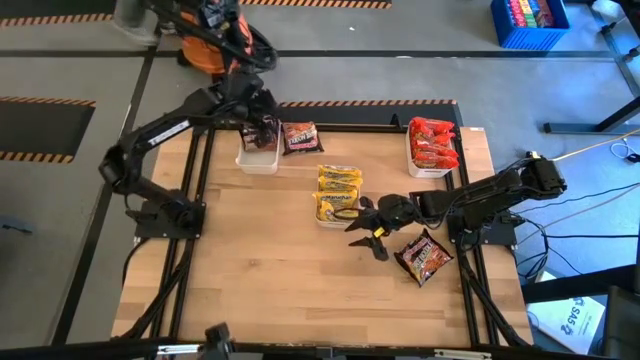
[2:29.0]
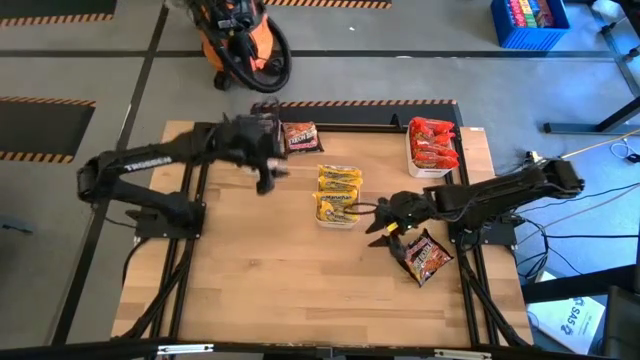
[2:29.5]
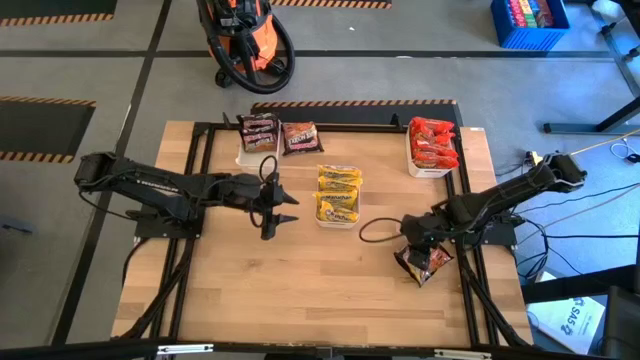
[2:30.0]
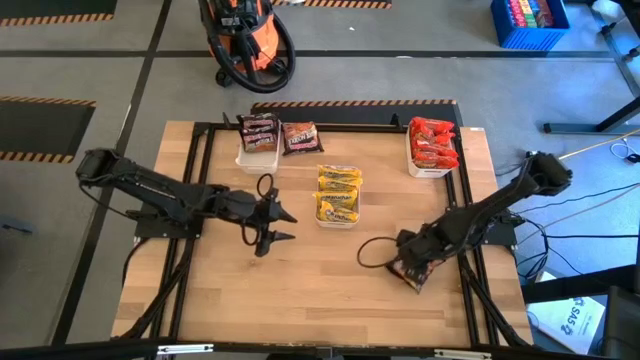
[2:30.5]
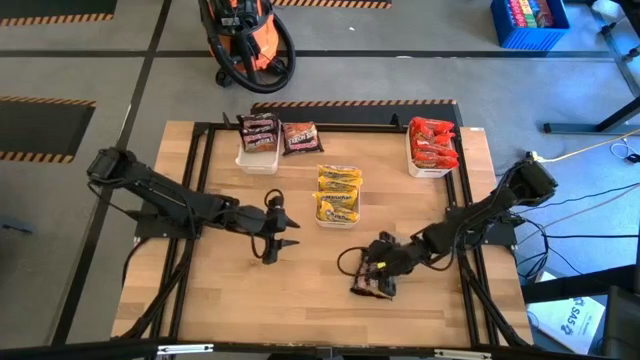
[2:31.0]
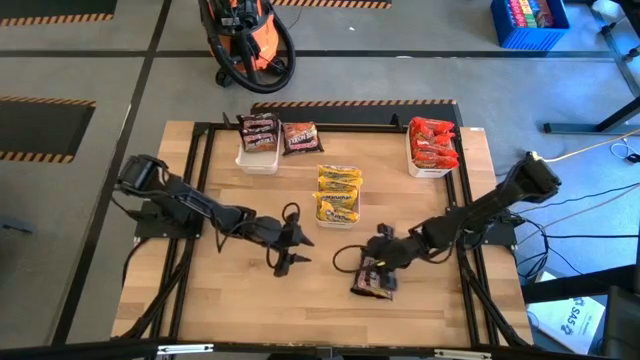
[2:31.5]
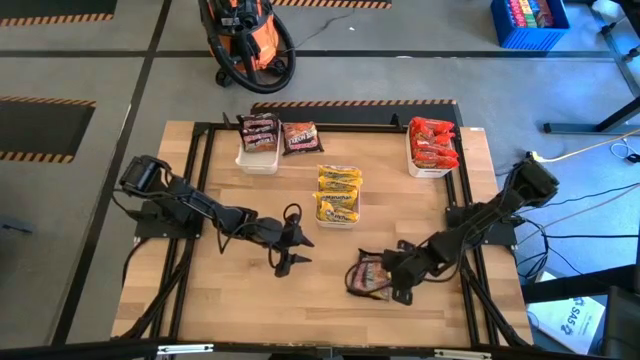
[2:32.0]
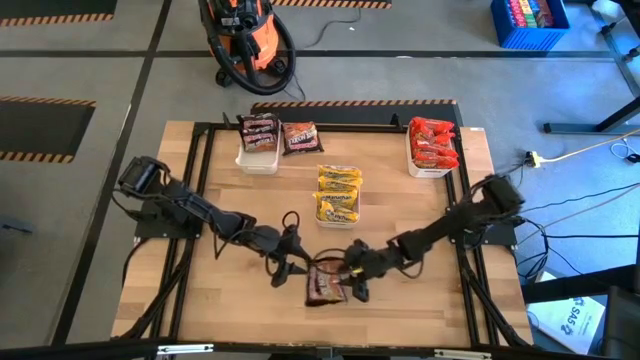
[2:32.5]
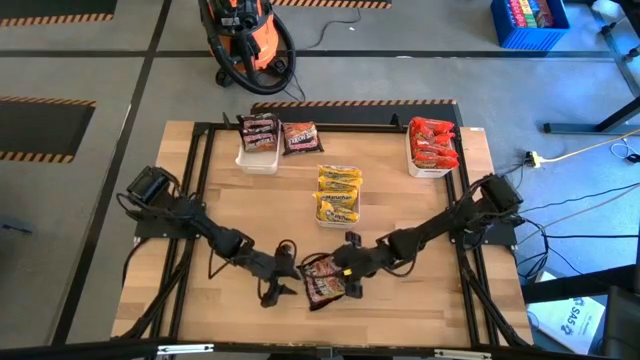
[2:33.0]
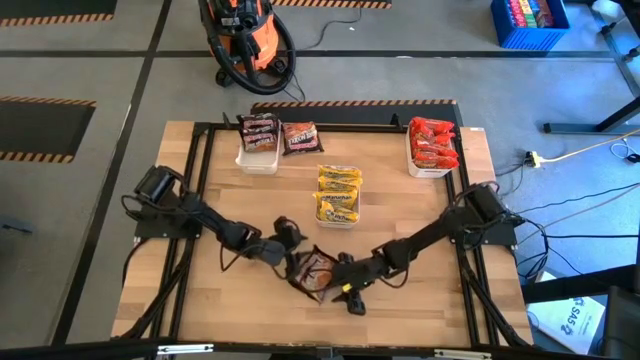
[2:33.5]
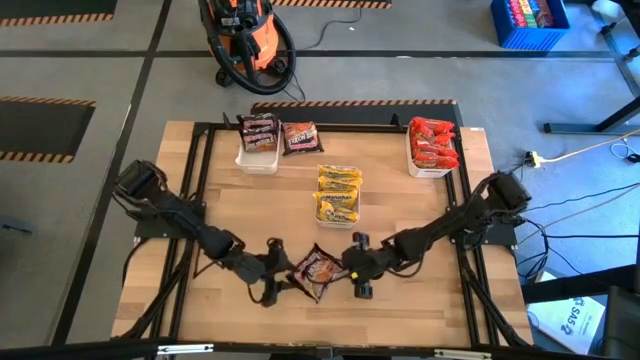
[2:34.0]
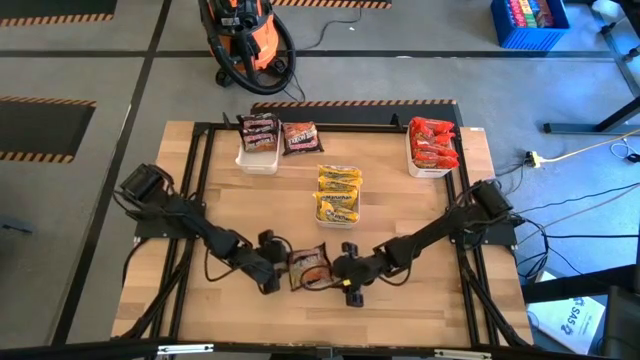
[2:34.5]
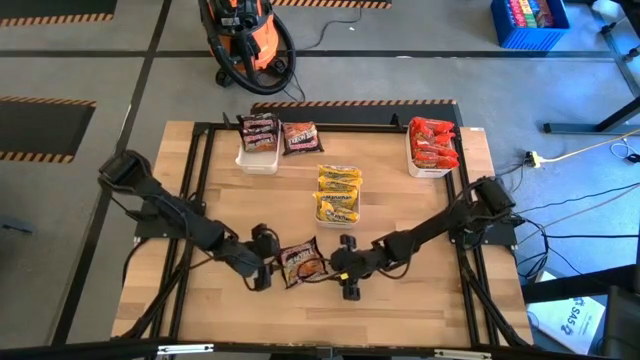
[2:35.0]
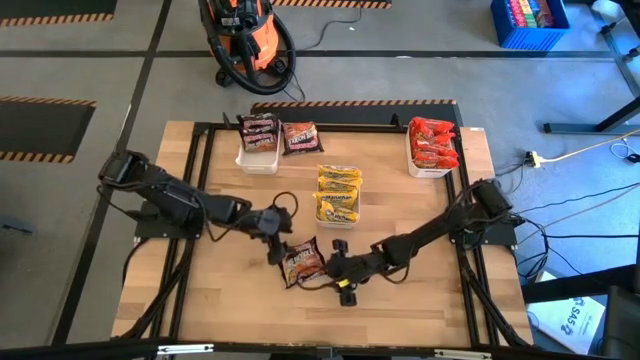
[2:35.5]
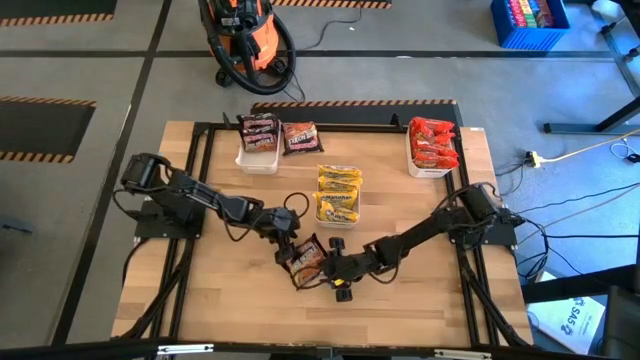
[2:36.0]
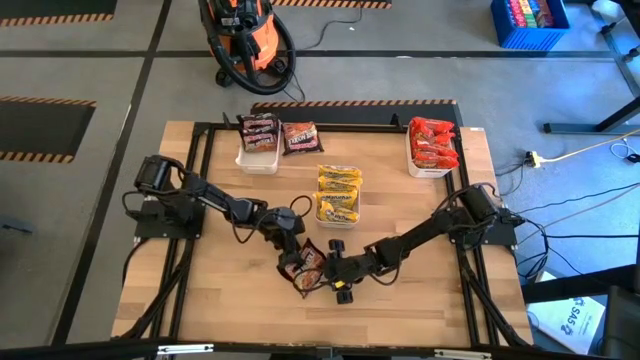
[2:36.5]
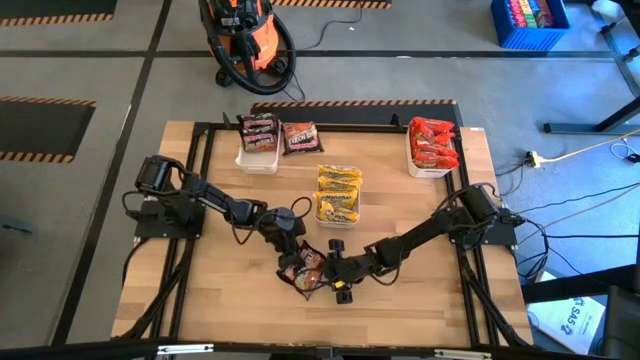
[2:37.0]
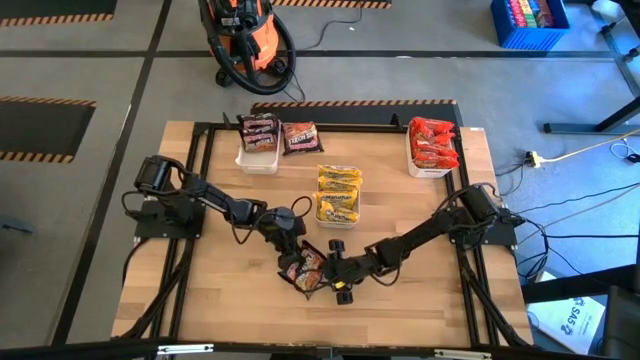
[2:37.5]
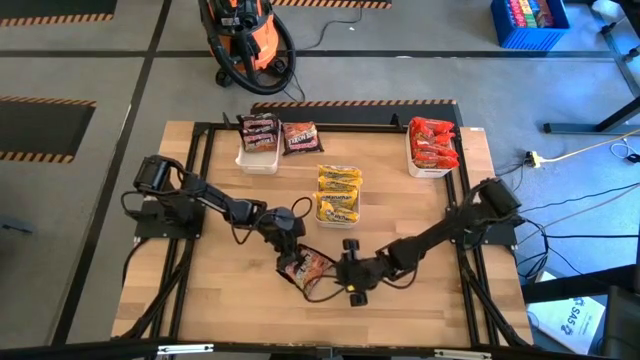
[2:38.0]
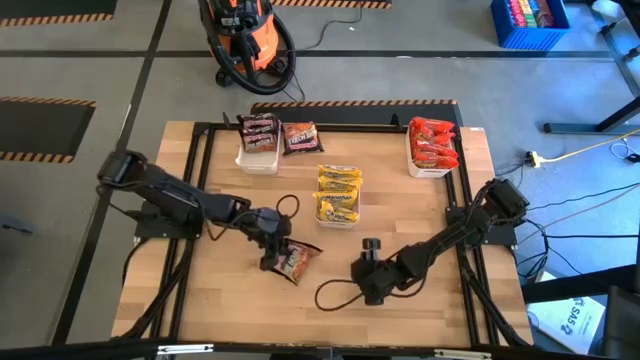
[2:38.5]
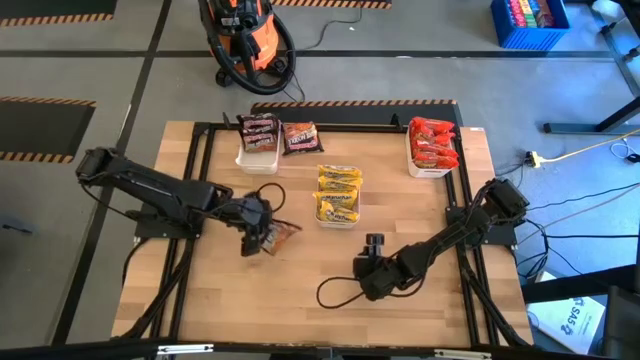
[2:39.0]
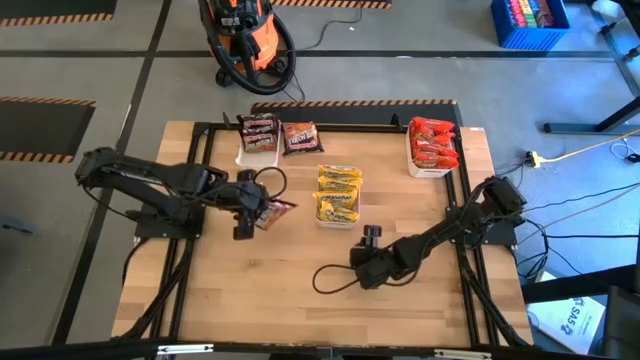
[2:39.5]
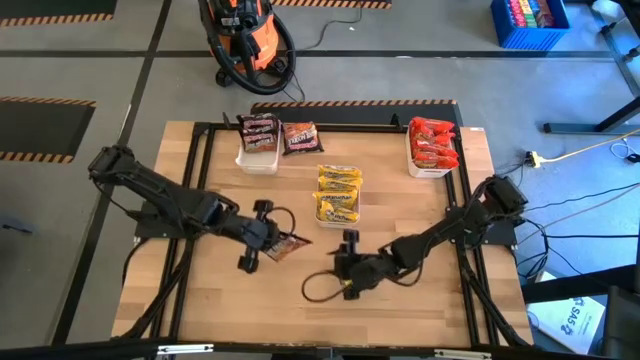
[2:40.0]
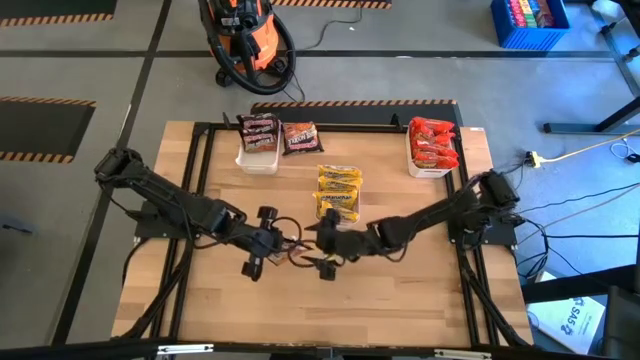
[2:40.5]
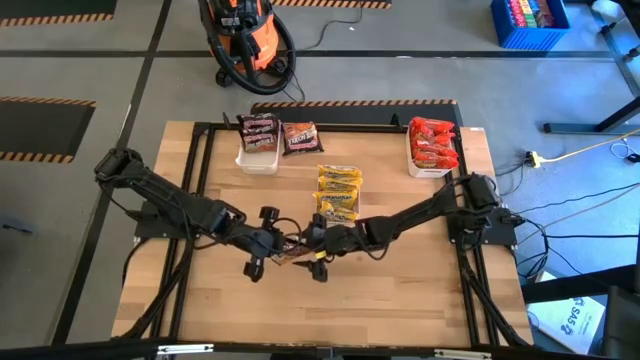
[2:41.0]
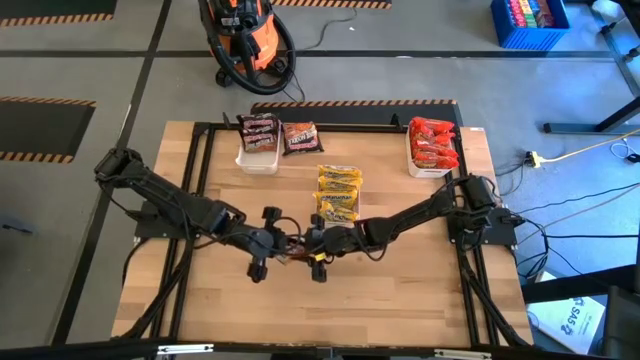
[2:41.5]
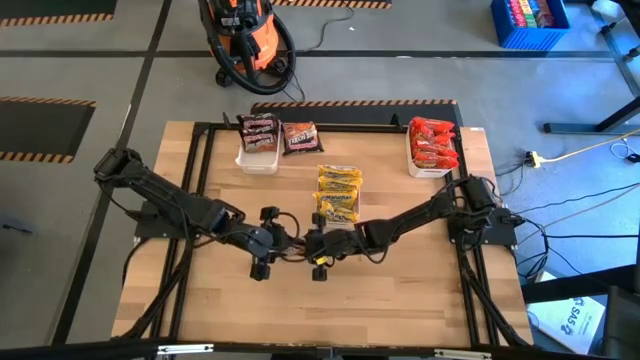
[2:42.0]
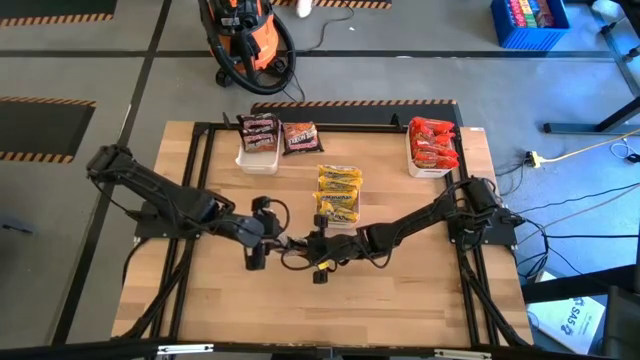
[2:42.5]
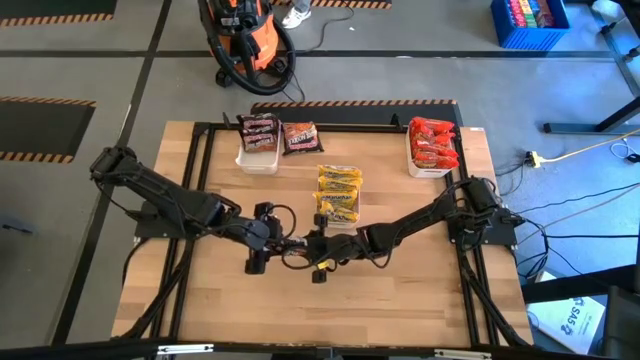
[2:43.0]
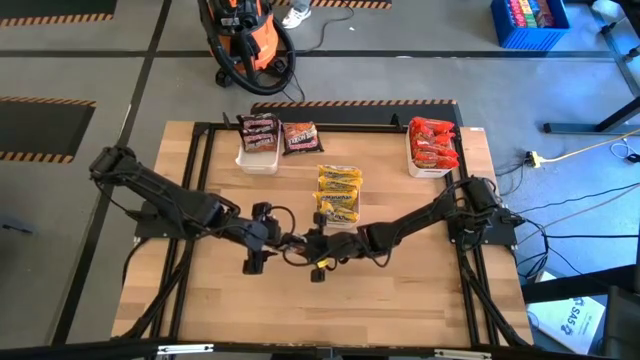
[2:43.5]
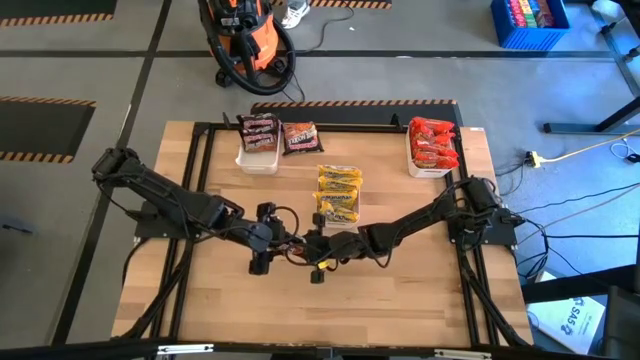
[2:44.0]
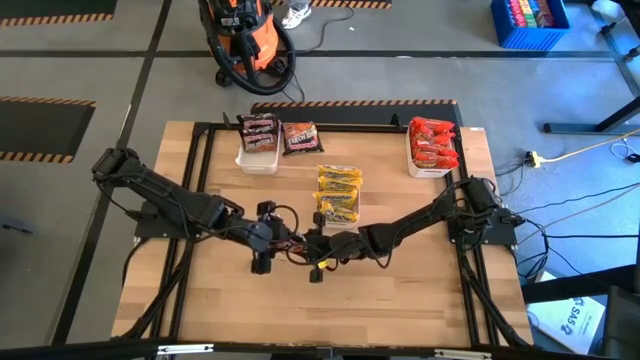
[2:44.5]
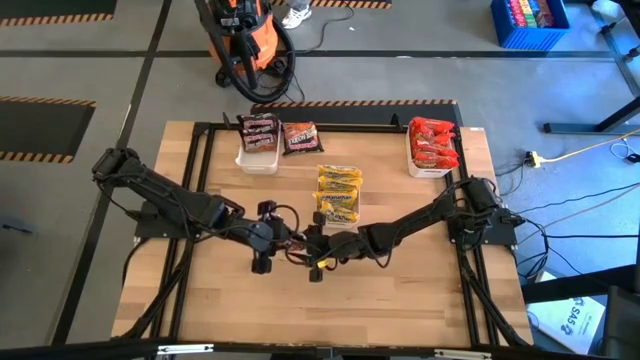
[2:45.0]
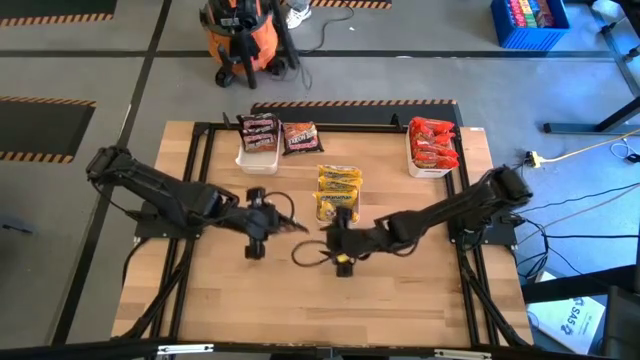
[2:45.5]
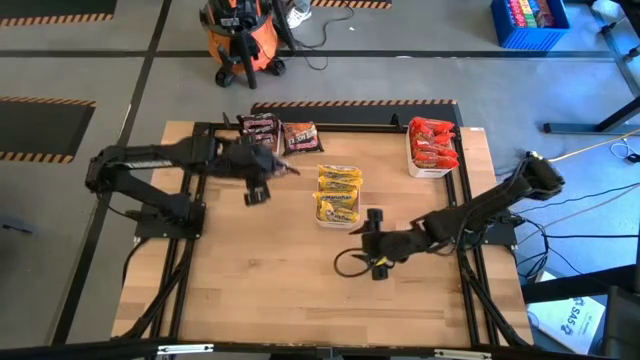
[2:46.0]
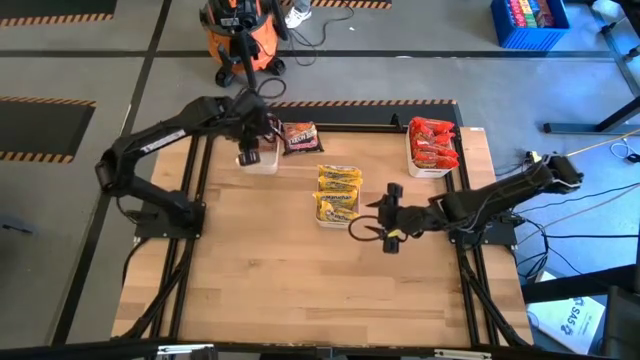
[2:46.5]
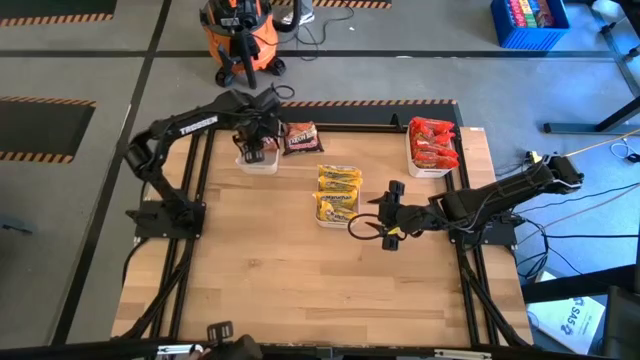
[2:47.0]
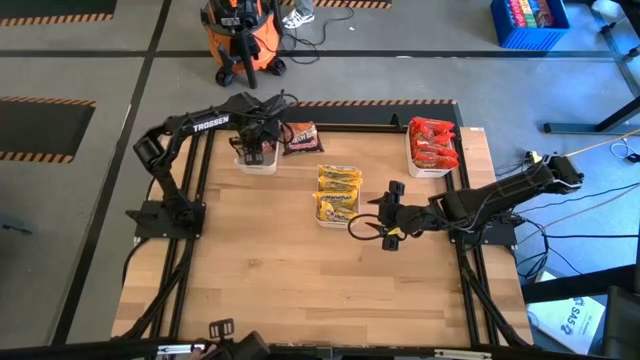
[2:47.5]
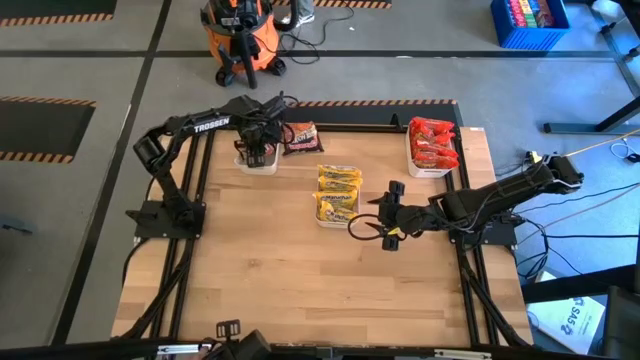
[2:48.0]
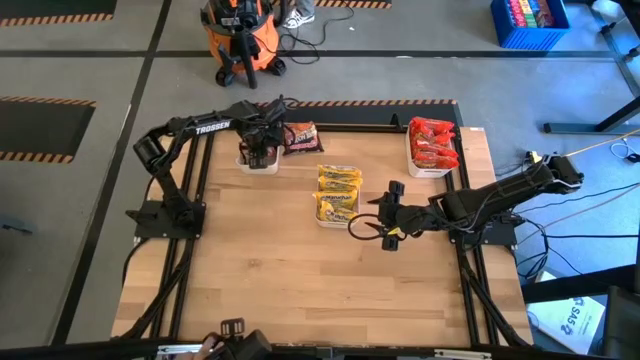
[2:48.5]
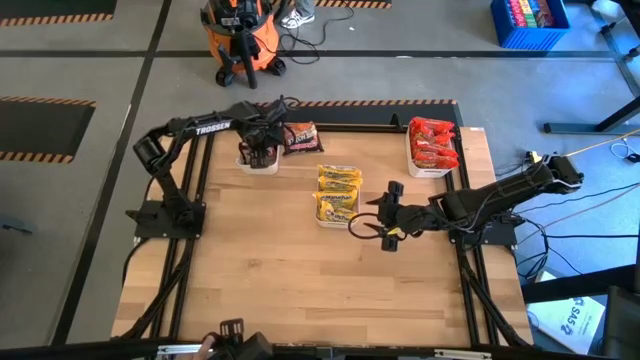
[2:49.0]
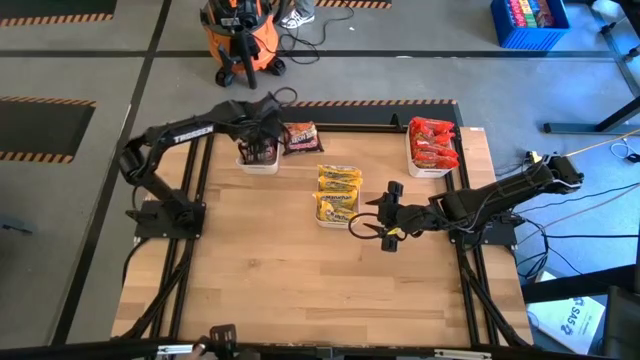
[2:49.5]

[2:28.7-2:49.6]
Task: Sort Maruchan noodles
Put the black noodle pack into the white left bin
